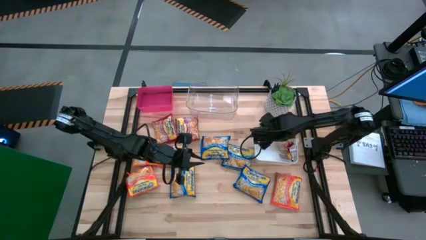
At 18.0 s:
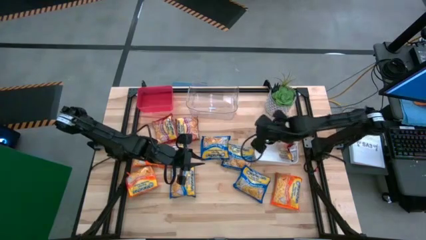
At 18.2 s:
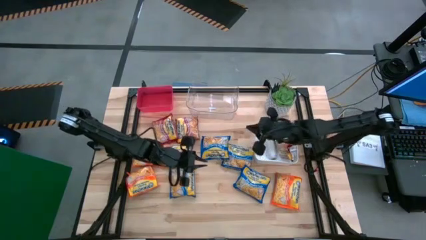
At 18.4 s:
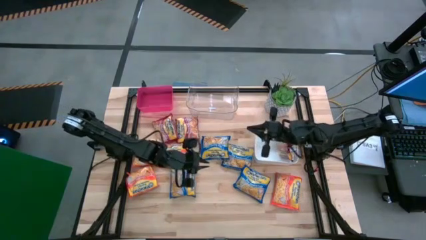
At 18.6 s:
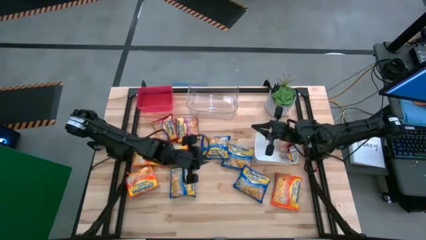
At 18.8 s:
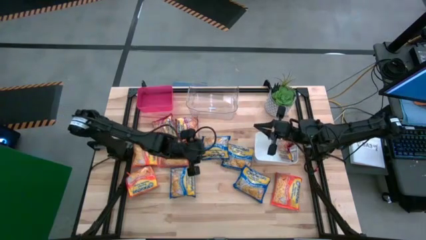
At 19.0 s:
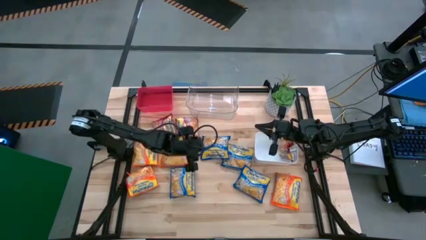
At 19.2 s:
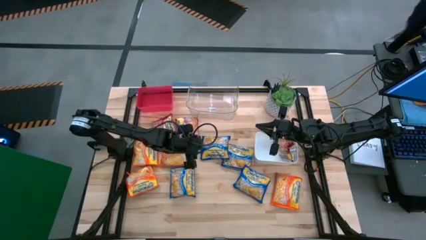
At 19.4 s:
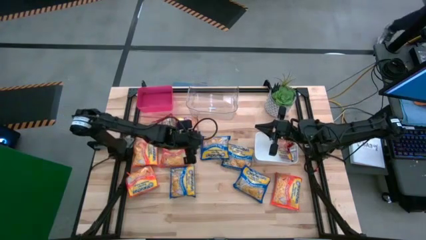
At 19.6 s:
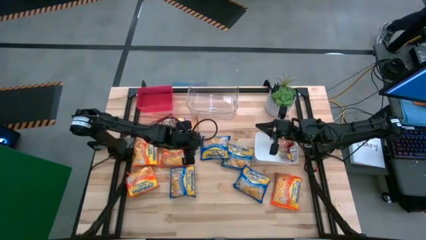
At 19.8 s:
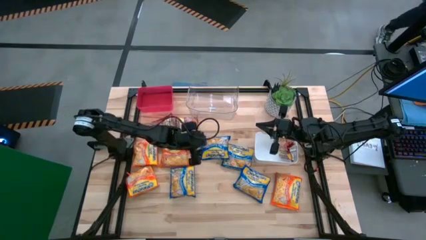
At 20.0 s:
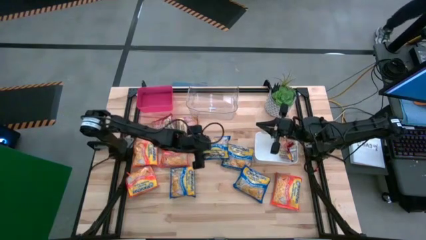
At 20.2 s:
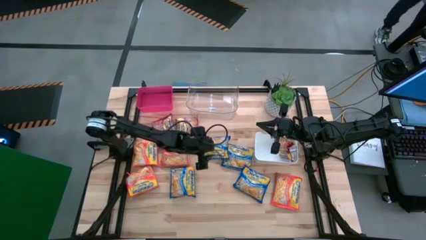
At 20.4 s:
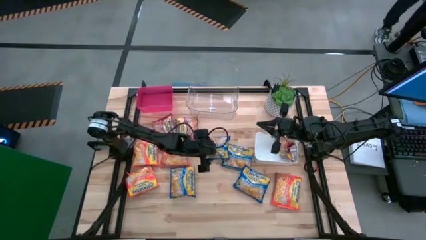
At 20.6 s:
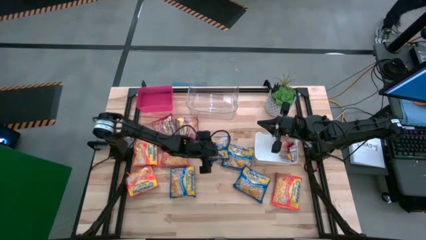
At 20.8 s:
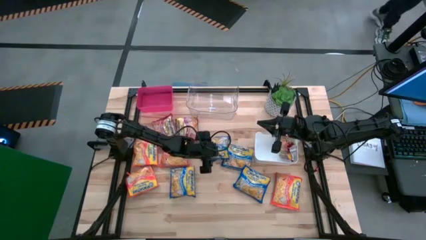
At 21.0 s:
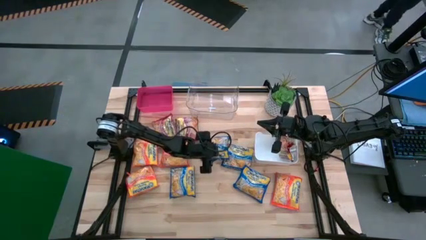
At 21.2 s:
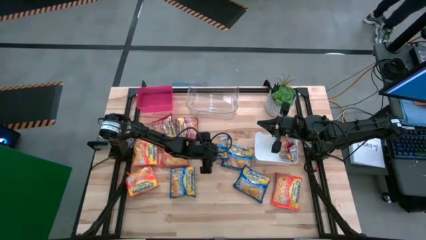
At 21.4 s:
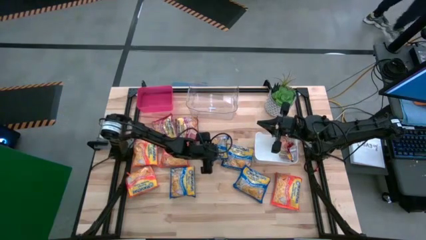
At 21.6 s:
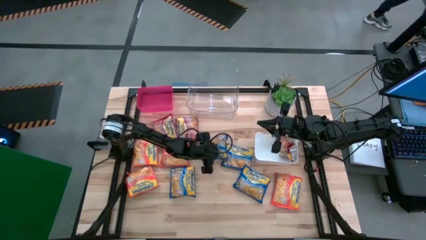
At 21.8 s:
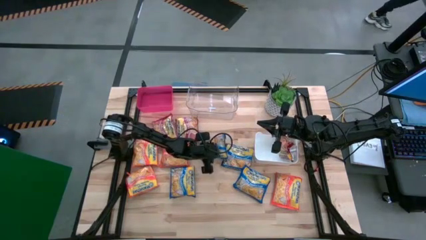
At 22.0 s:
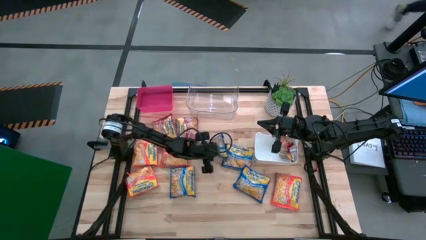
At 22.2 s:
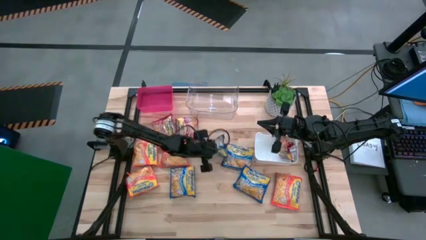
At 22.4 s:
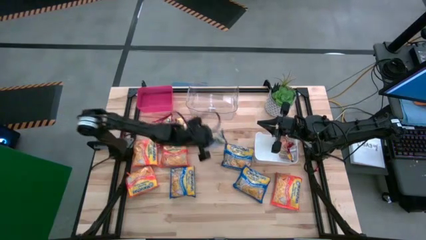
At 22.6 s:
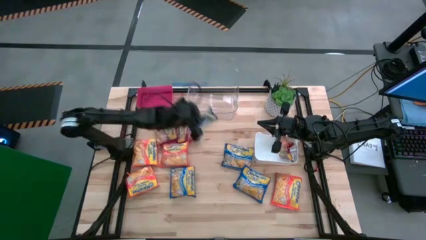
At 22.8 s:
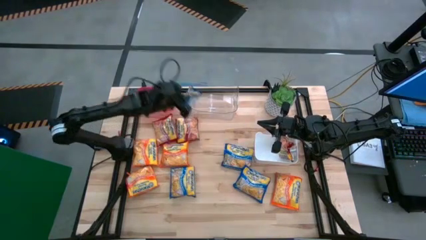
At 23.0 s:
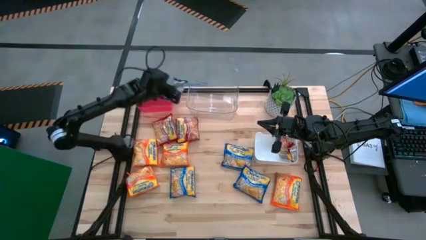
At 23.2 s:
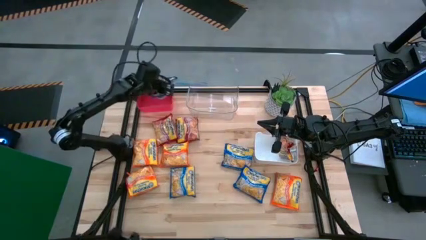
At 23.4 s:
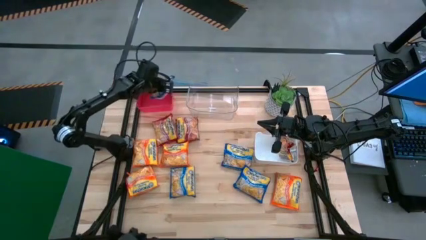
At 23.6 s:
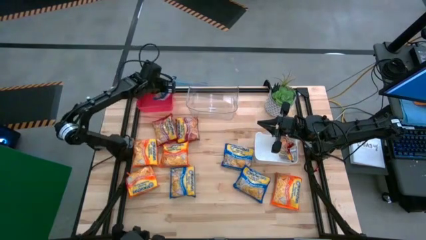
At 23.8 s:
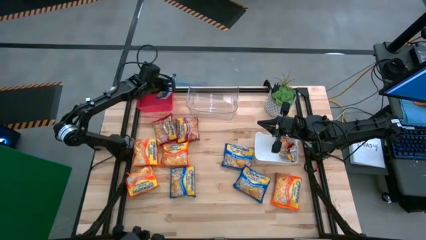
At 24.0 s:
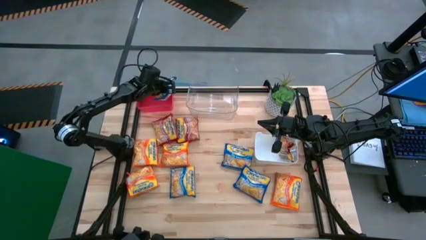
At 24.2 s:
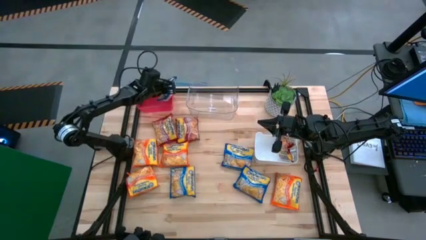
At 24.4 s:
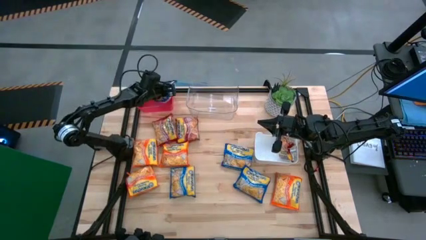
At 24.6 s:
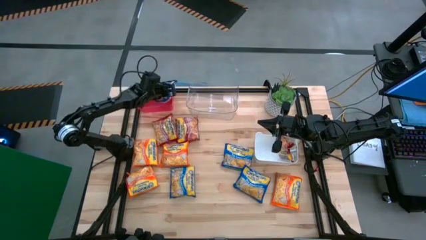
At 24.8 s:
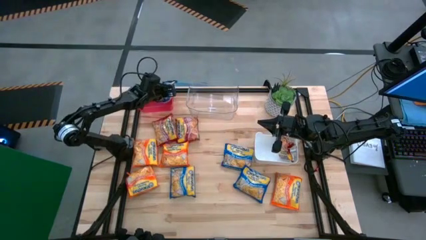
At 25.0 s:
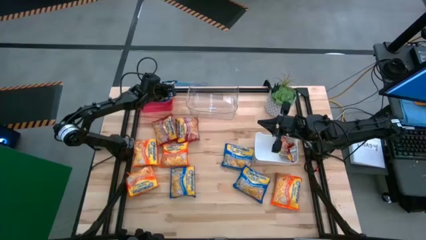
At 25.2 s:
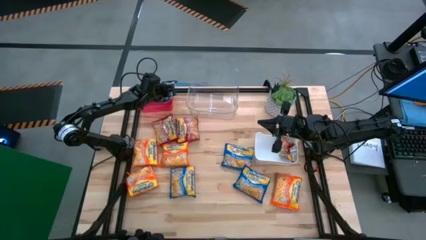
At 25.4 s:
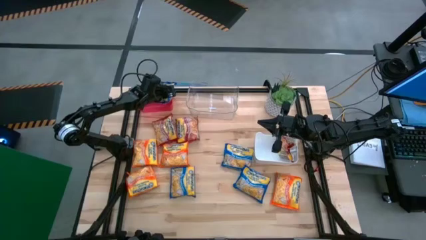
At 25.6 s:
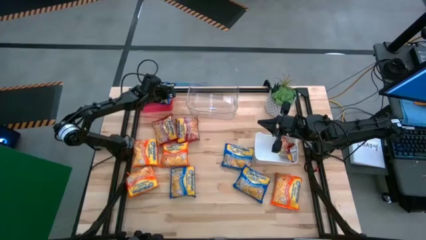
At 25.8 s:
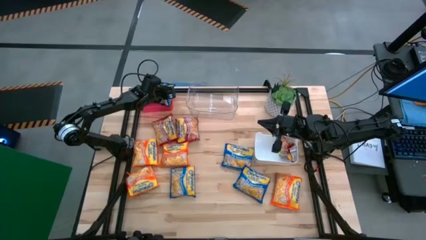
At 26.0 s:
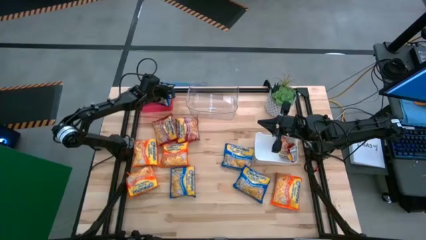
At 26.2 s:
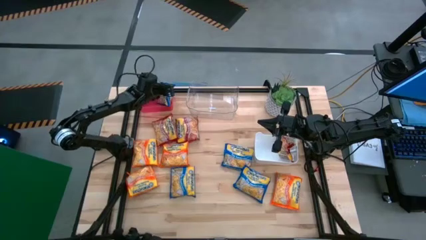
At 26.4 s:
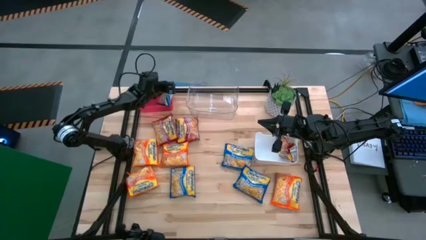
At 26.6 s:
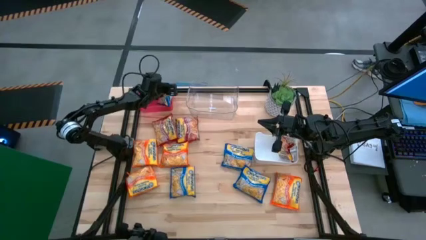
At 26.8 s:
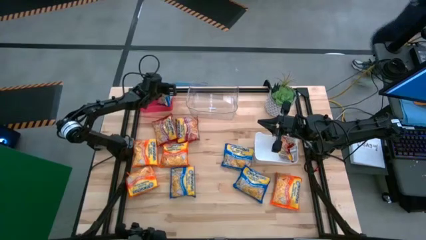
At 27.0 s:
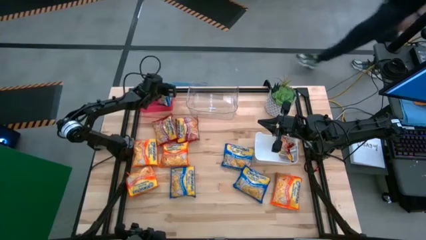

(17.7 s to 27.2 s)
Task: Sort Maruchan noodles
Put the blue noodle pack into the red bin
